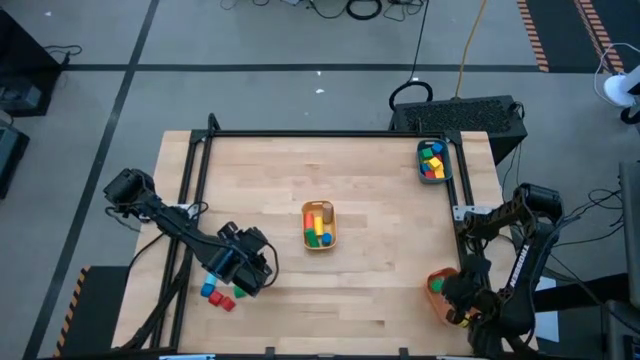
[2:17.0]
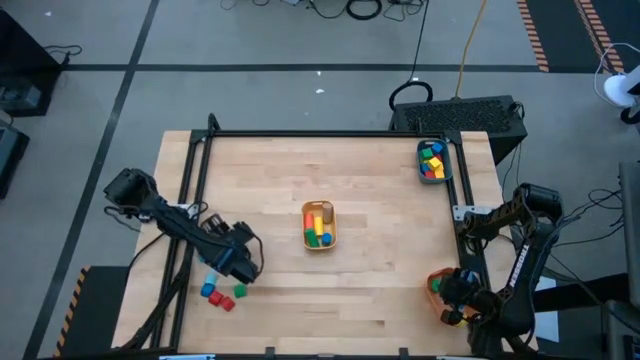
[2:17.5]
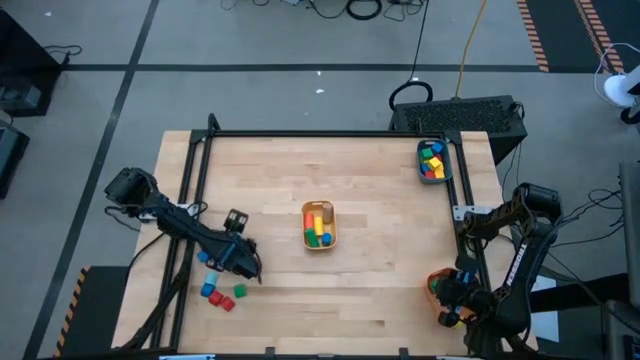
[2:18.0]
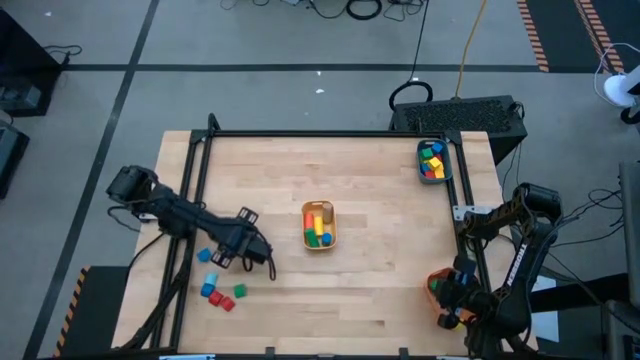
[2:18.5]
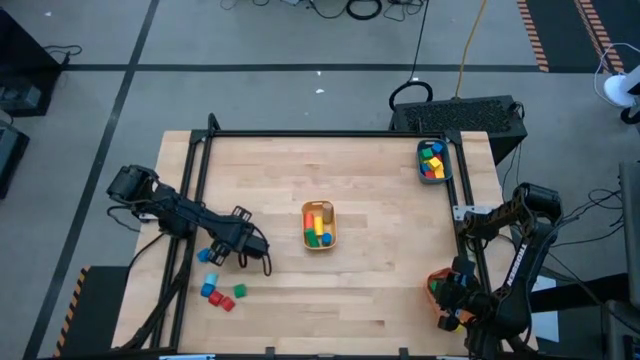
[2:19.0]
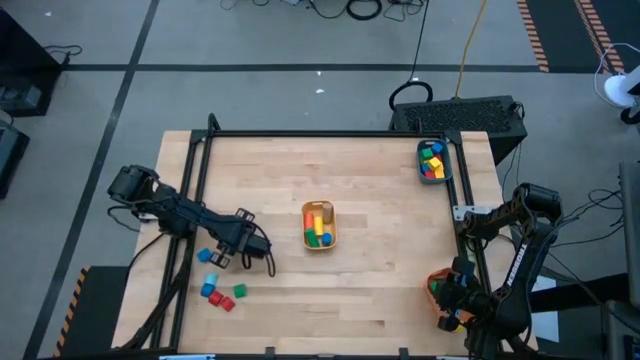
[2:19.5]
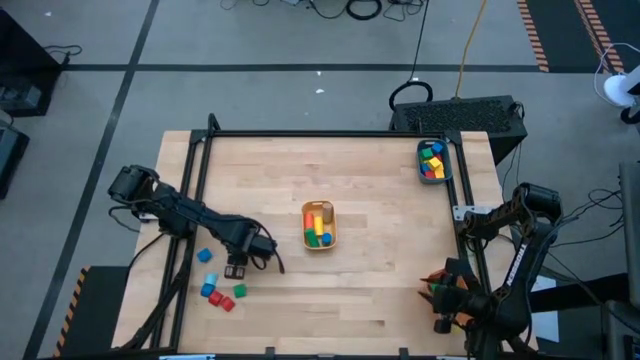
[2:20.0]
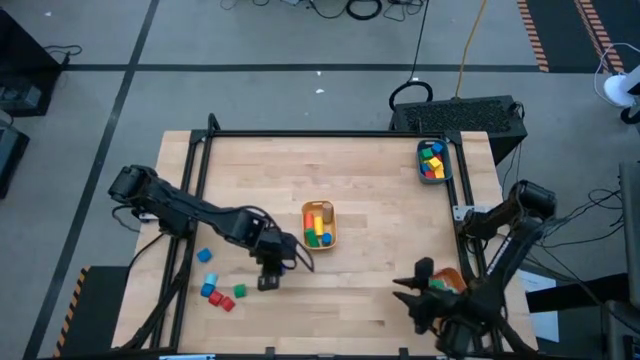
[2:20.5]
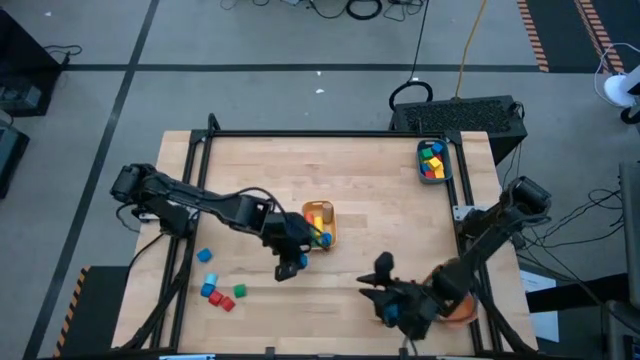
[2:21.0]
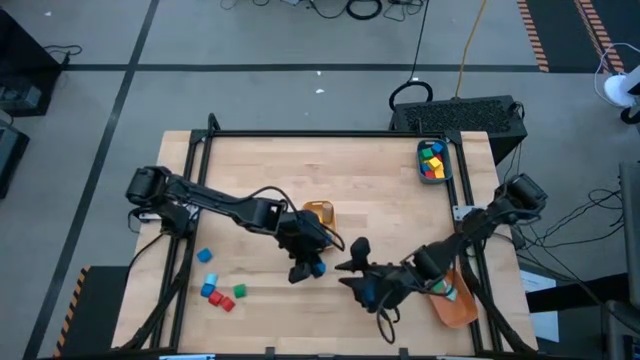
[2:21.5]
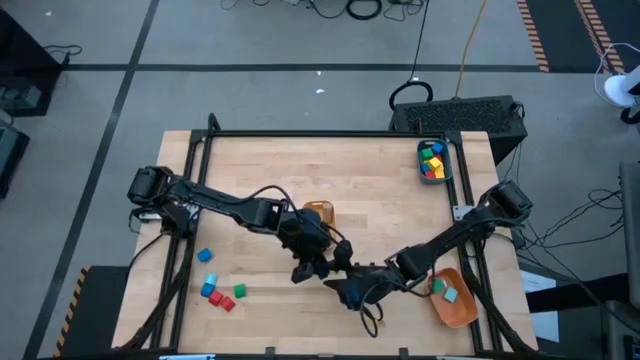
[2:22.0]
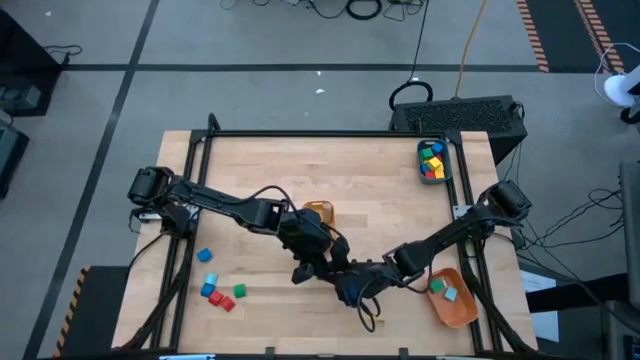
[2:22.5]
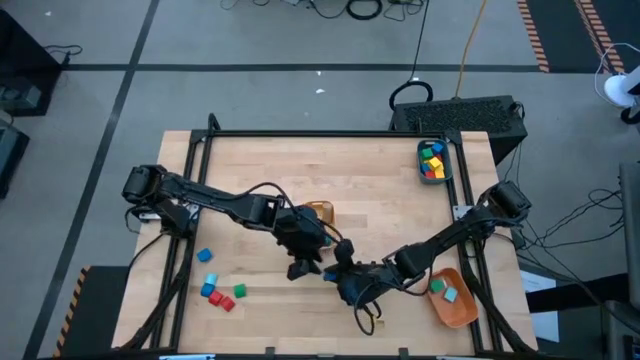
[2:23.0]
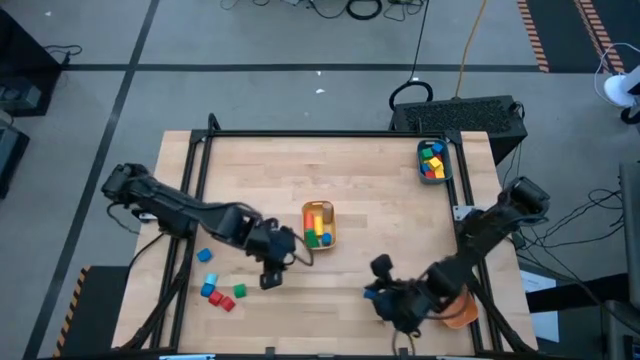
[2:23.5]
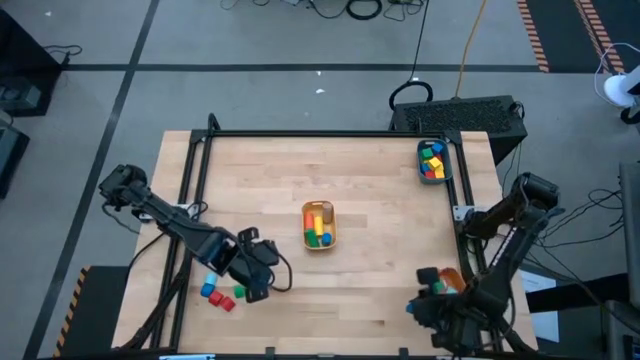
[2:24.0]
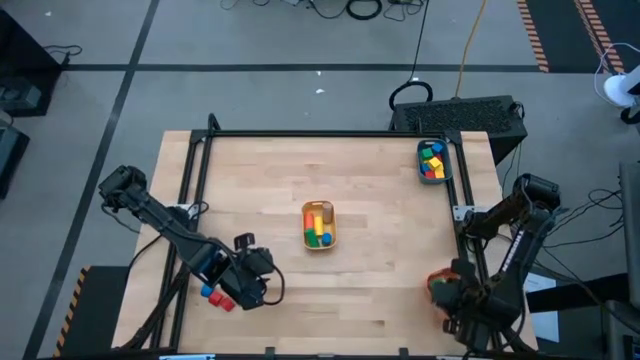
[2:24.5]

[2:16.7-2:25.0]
Task: Sort blocks by size
Put the blue half-circle block into the orange bin

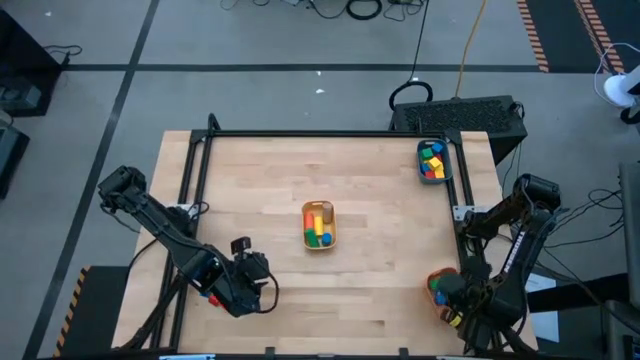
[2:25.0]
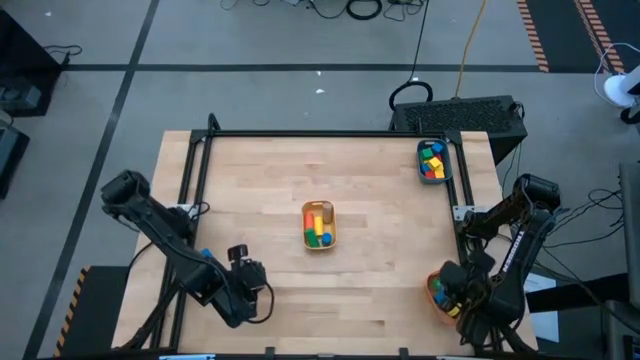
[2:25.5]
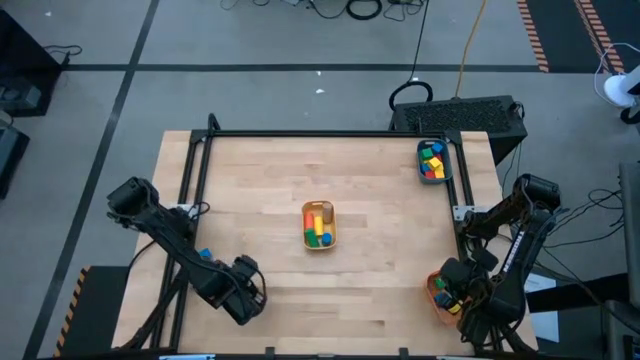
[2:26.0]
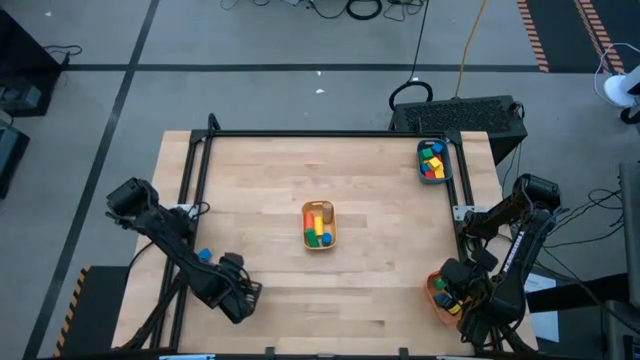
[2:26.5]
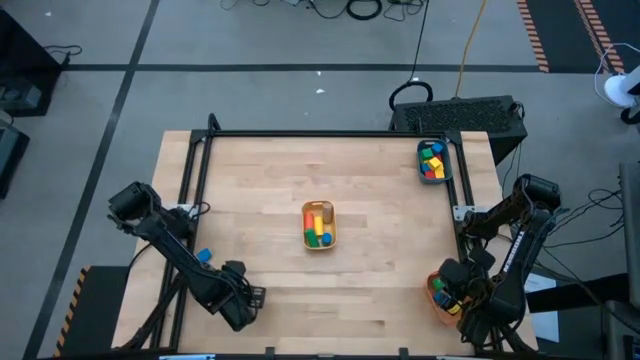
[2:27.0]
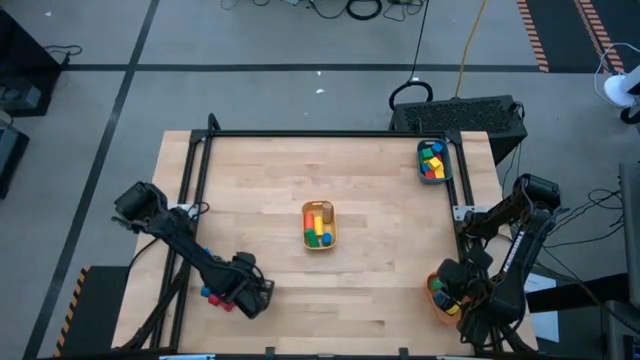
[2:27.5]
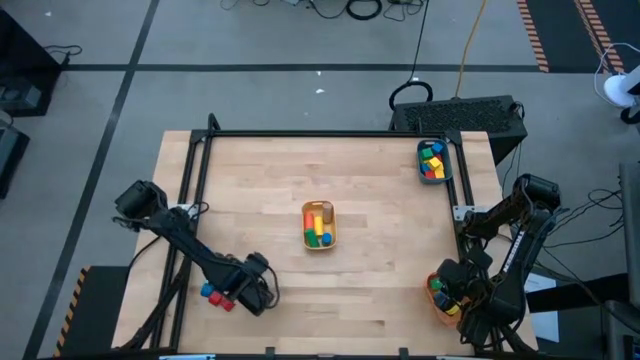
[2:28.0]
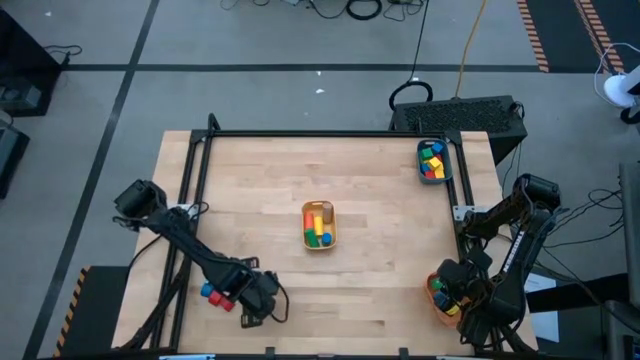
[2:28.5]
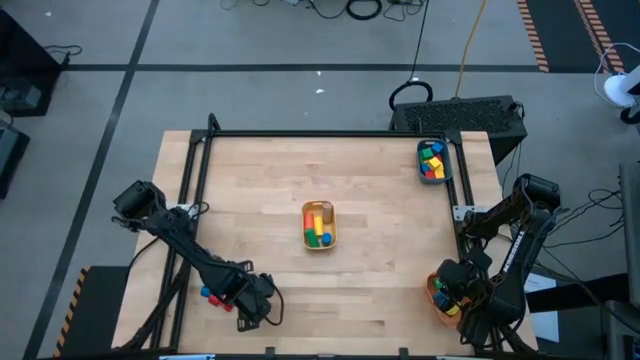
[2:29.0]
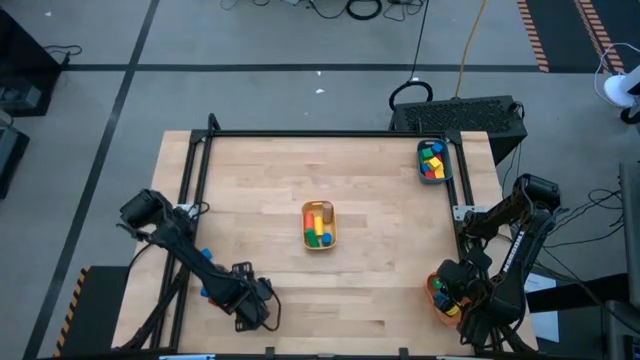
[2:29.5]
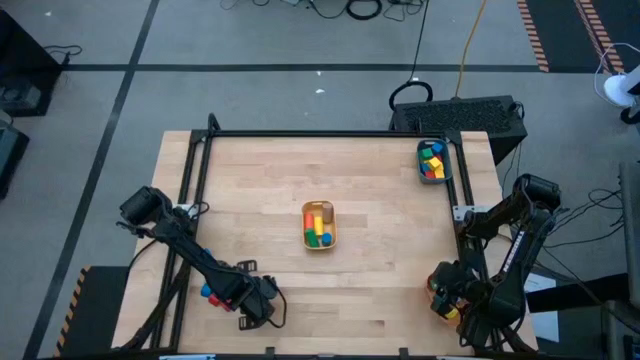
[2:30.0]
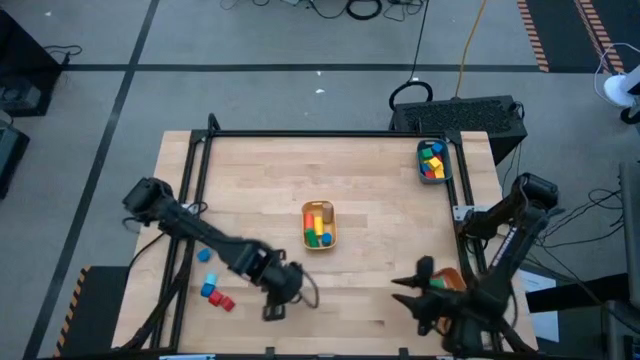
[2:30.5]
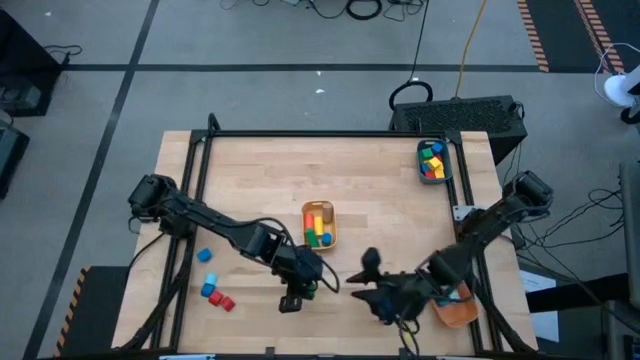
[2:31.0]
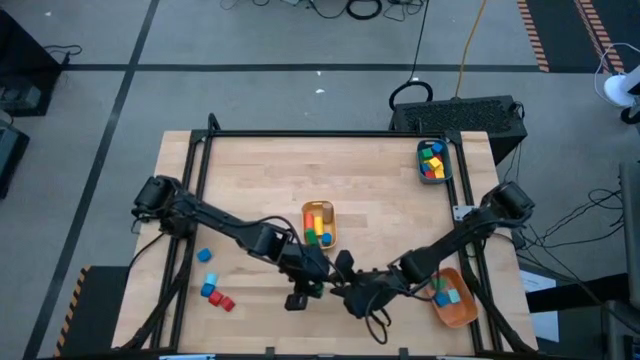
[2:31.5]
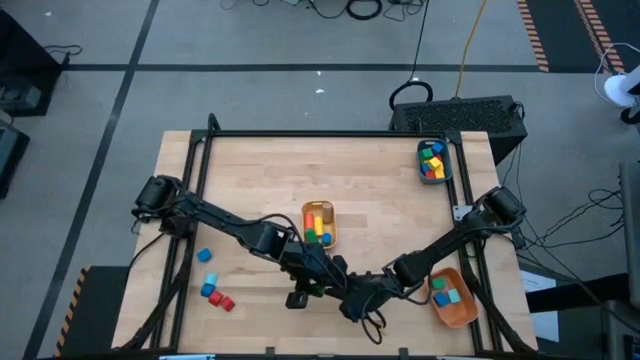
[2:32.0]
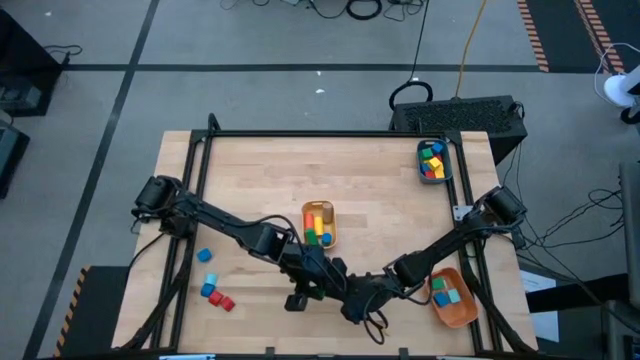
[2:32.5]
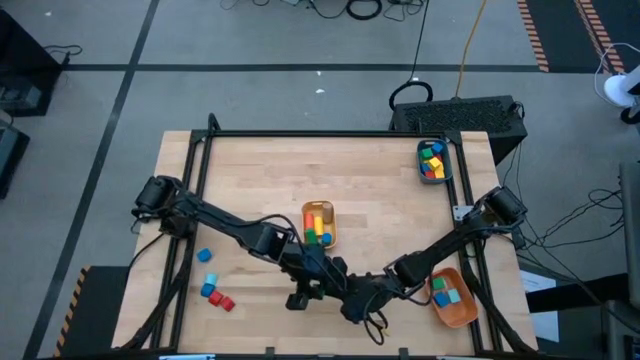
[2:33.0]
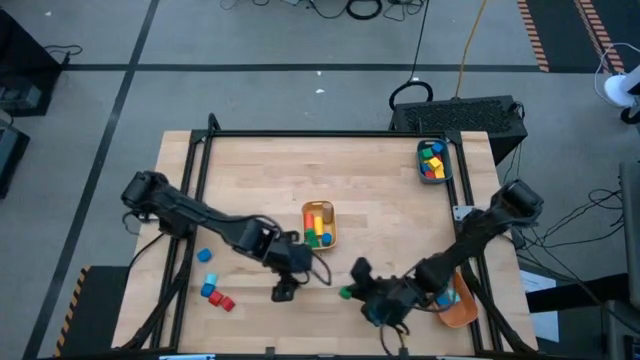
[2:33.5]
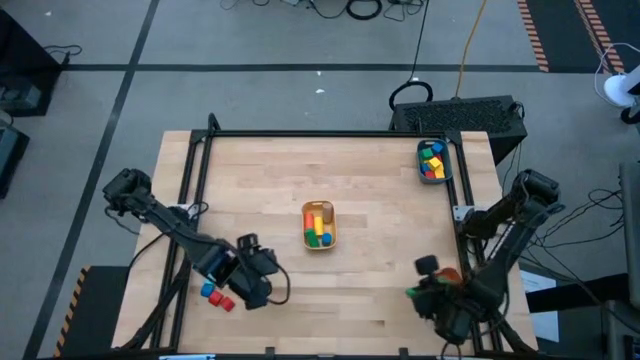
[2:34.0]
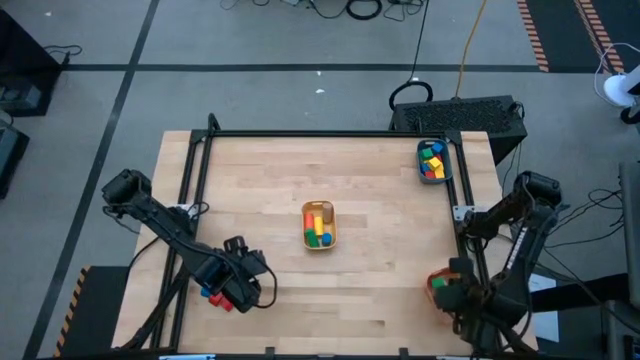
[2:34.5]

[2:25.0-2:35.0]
Put the green half-circle block into the orange bin

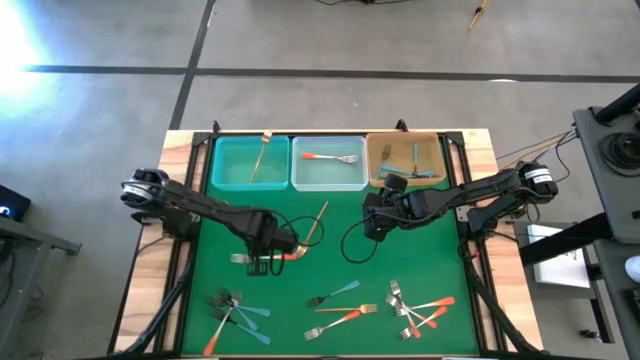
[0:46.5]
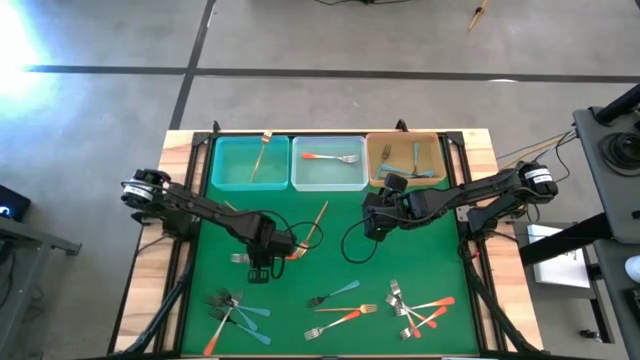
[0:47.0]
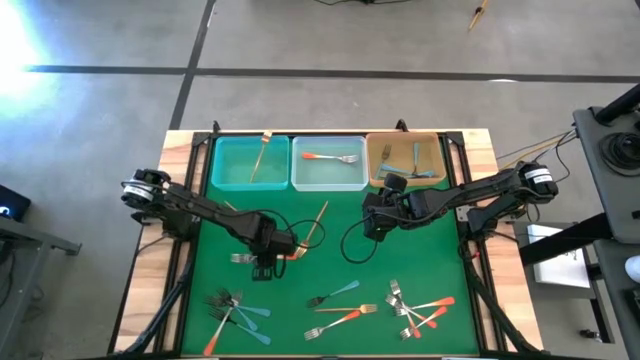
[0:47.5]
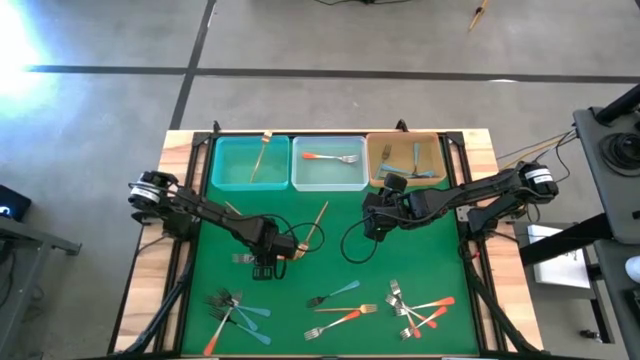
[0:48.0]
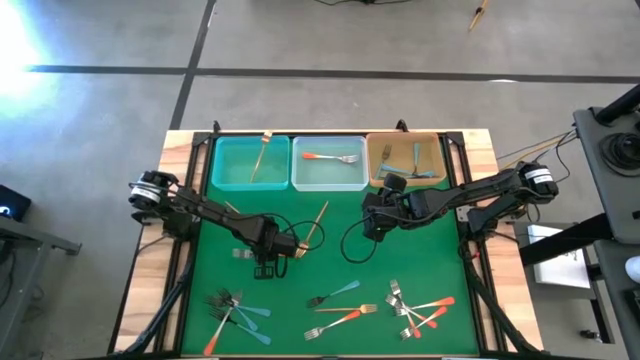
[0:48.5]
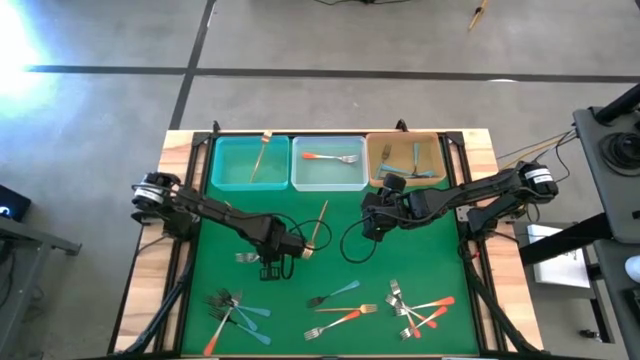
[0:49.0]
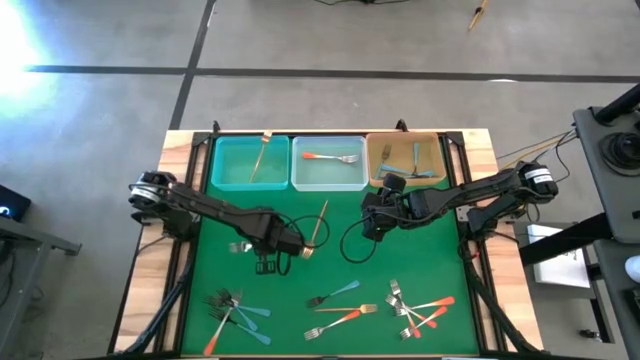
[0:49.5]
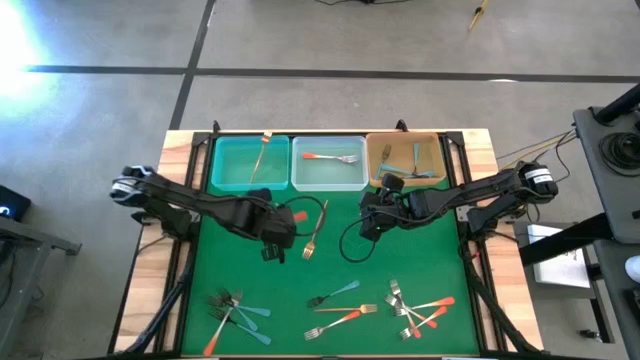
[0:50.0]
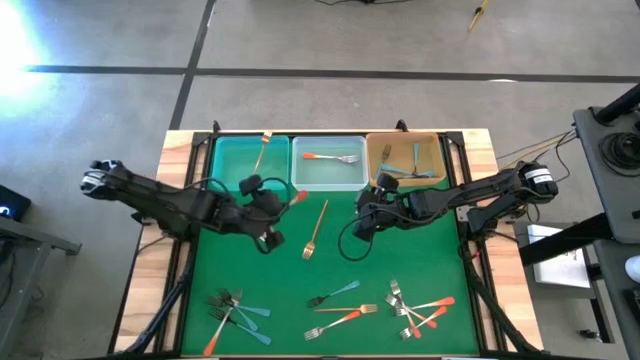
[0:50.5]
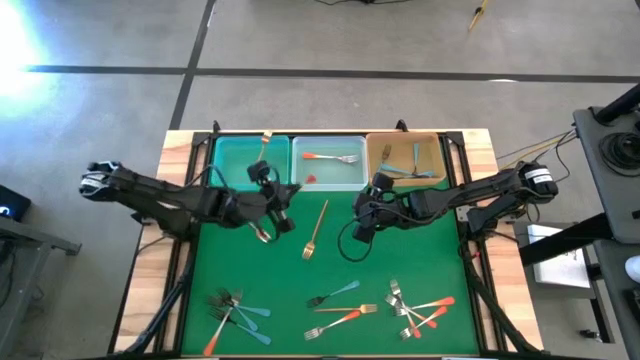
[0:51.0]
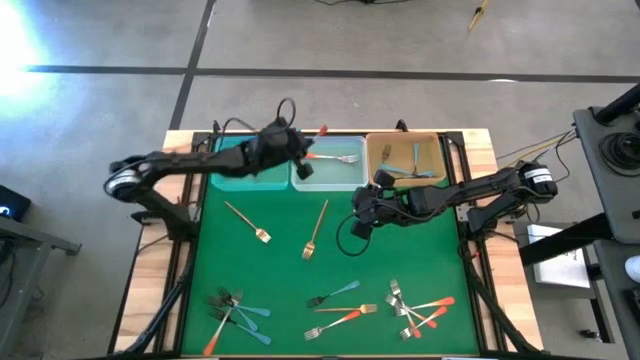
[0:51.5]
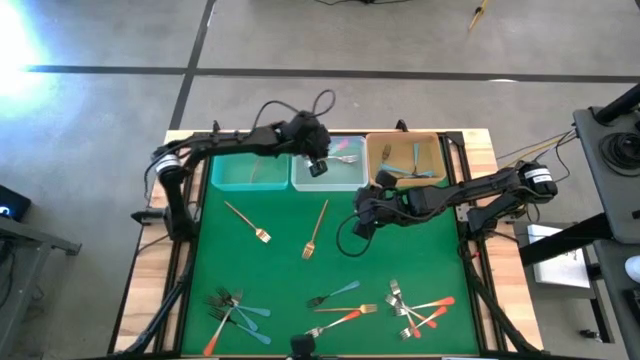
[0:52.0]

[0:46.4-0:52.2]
Task: Sort silverware by color (type)
Put the orange fork into the white bin
